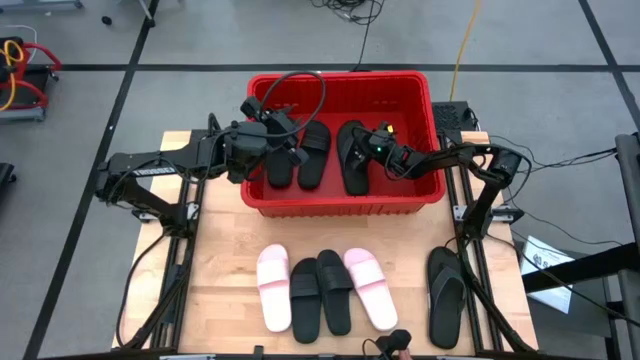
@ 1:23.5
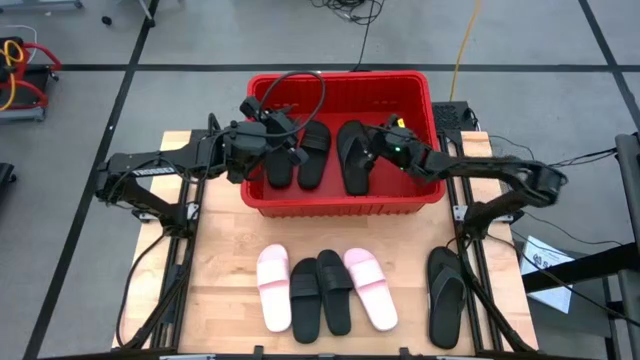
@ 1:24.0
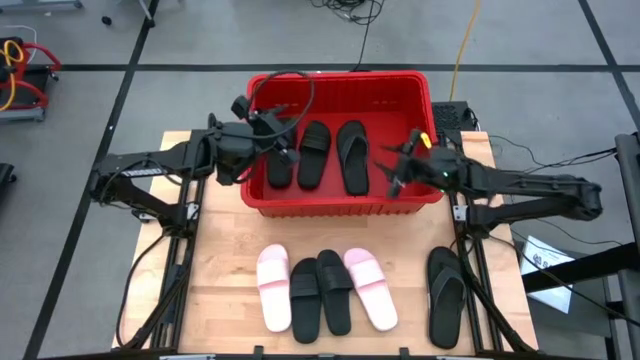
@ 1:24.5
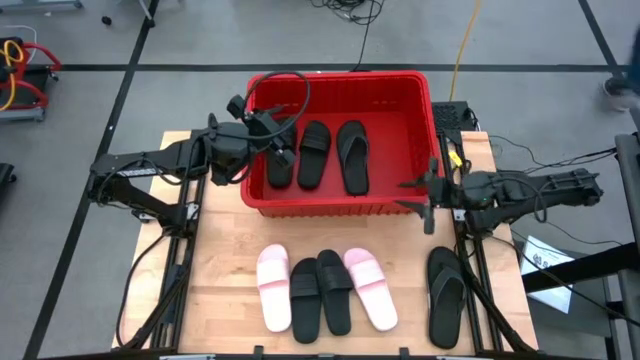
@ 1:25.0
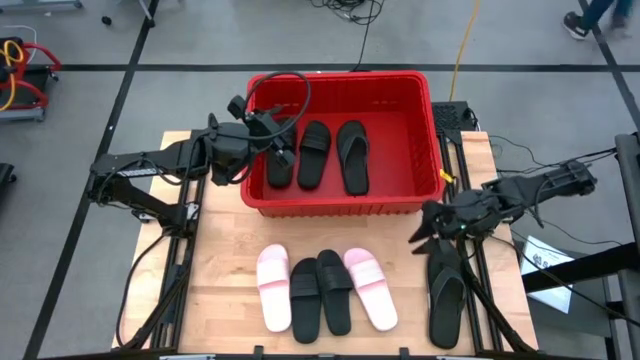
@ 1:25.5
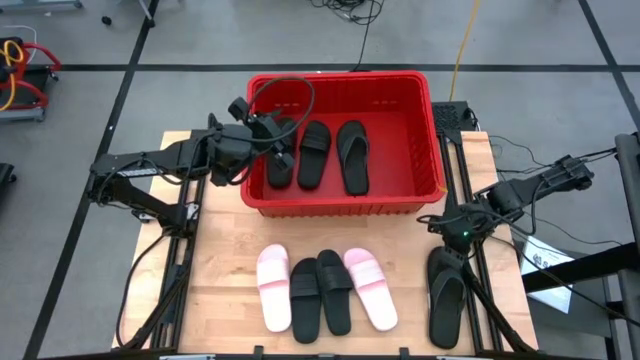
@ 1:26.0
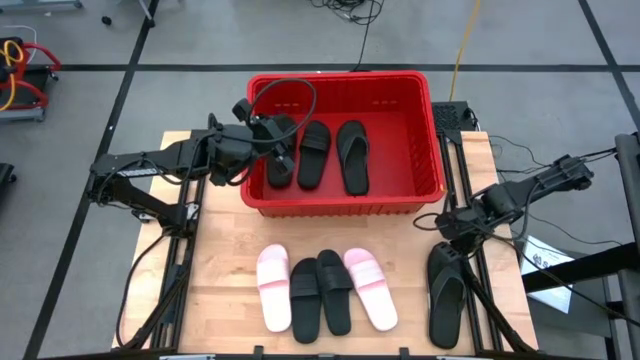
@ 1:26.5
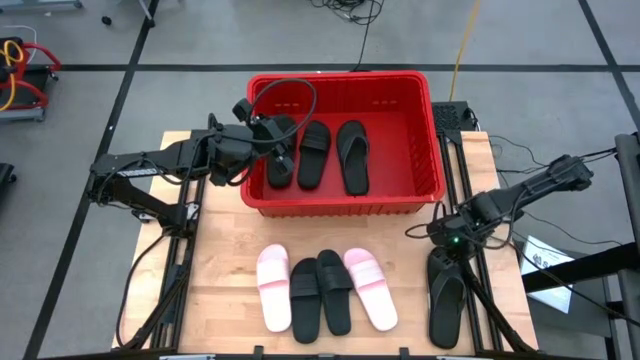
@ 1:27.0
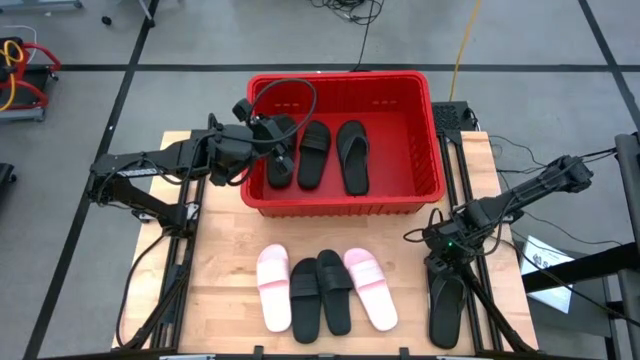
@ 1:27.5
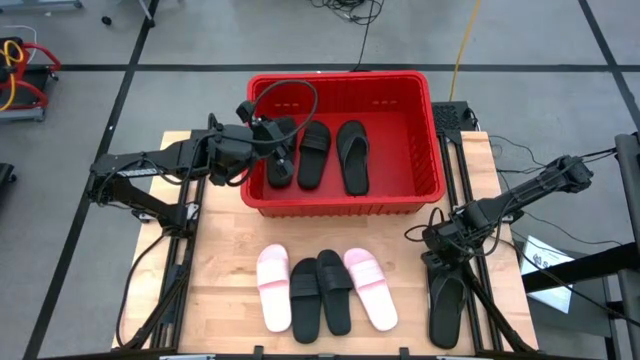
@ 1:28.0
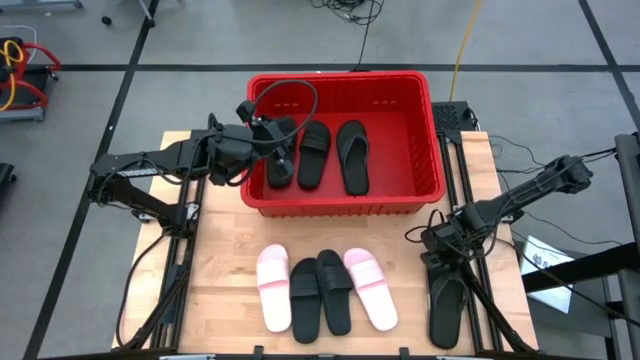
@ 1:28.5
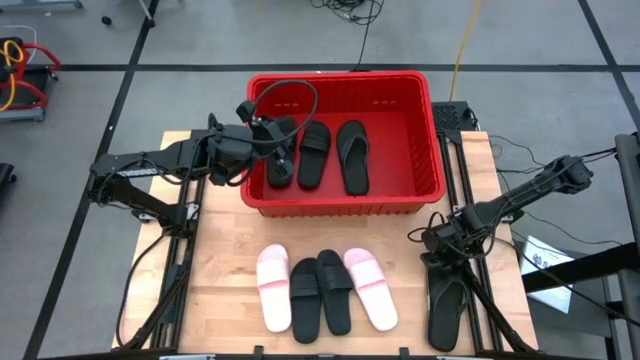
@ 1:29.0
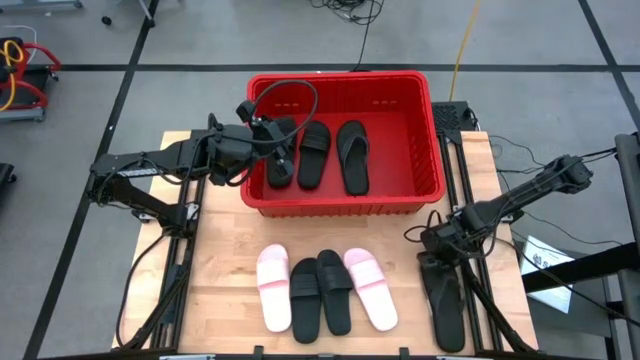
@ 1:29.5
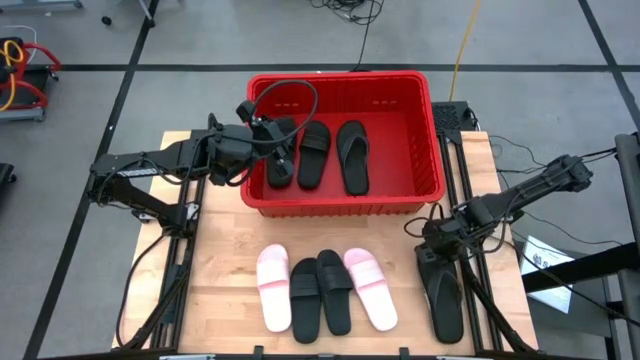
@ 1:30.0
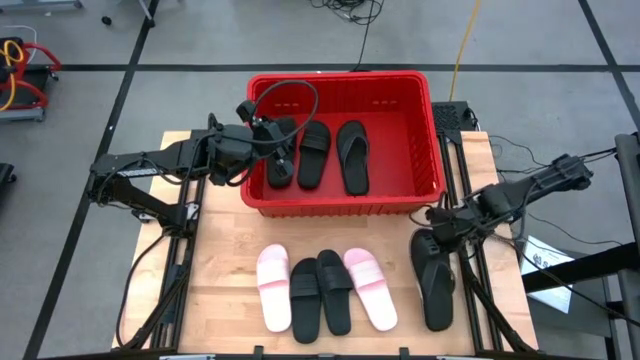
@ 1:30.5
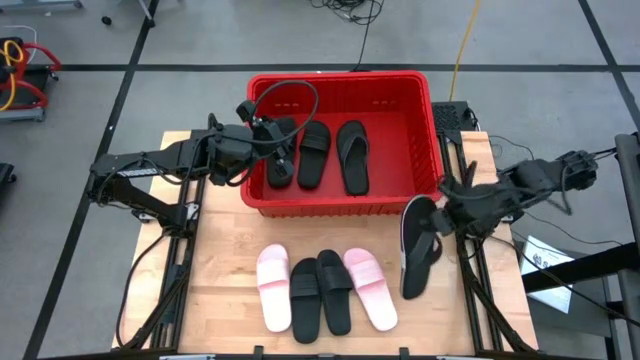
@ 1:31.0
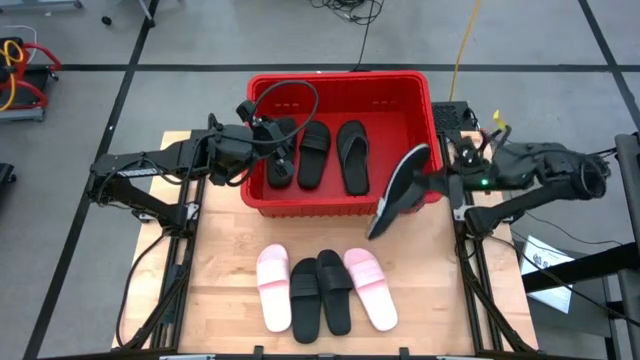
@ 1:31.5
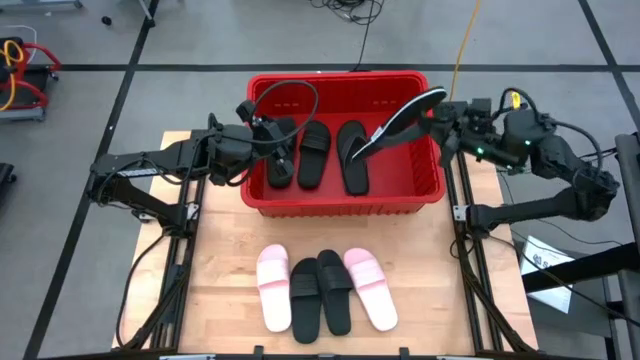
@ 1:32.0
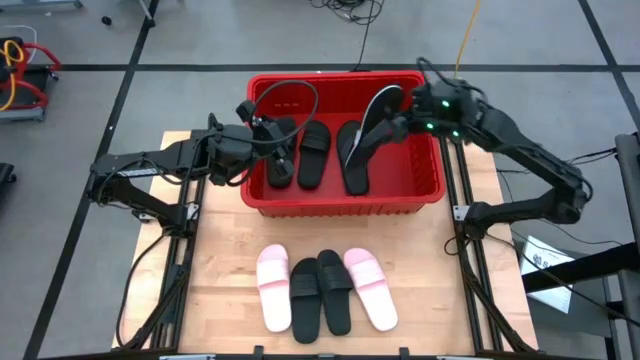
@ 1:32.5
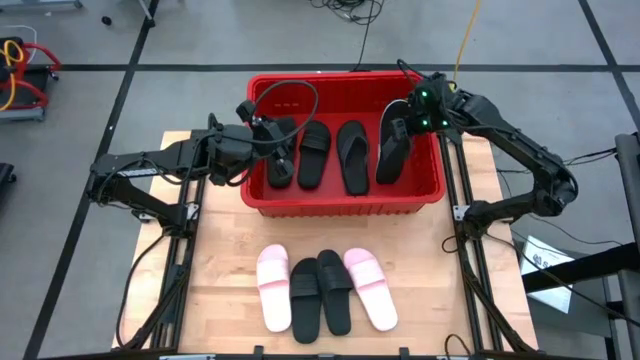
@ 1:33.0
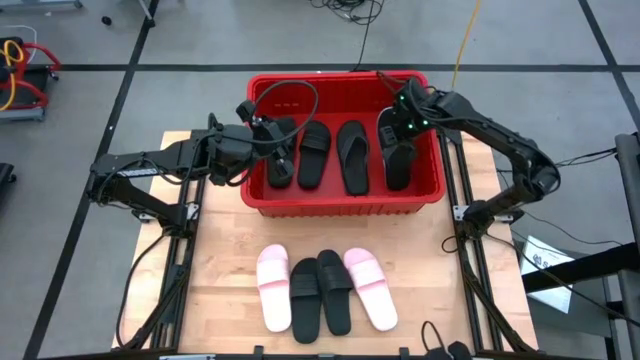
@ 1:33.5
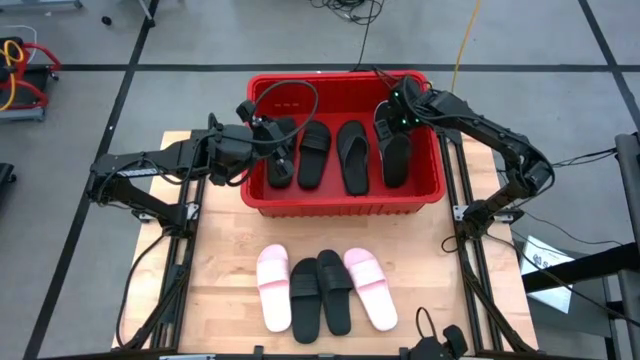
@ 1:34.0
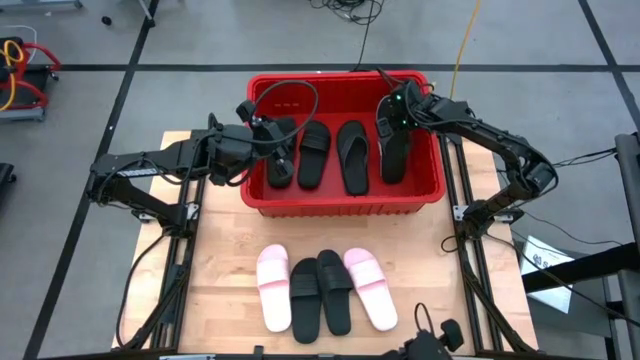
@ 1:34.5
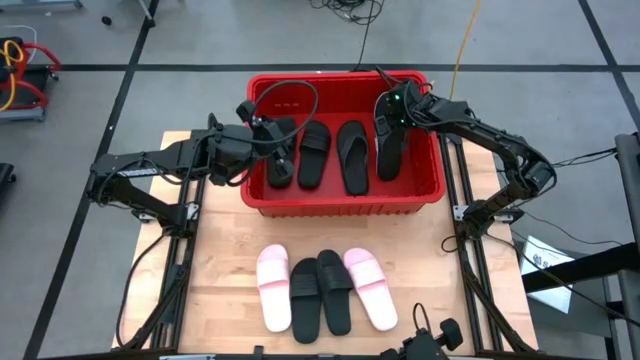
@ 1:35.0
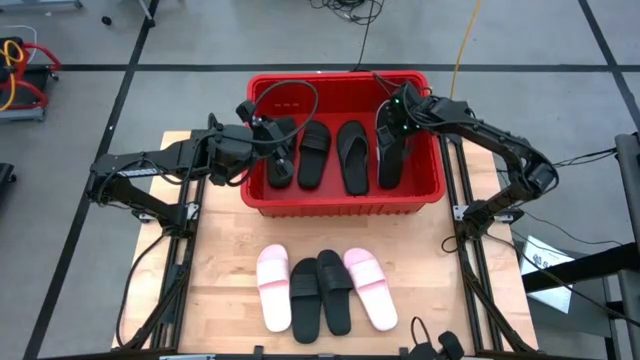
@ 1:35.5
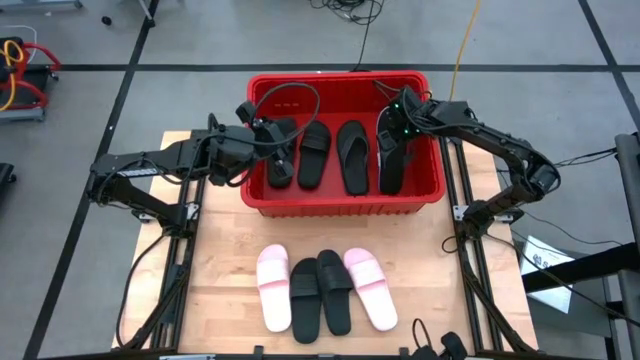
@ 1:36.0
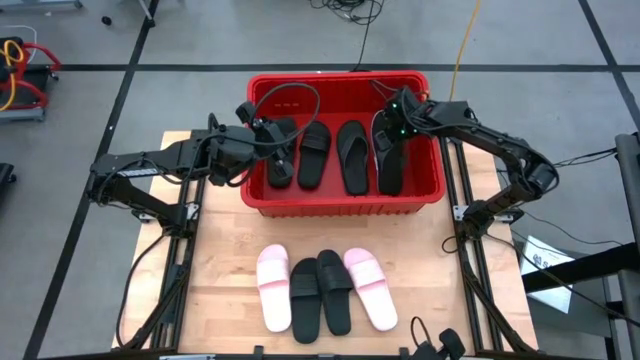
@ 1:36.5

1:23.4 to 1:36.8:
Task: Pick and place slides into bin
Put the black slipper into the red container

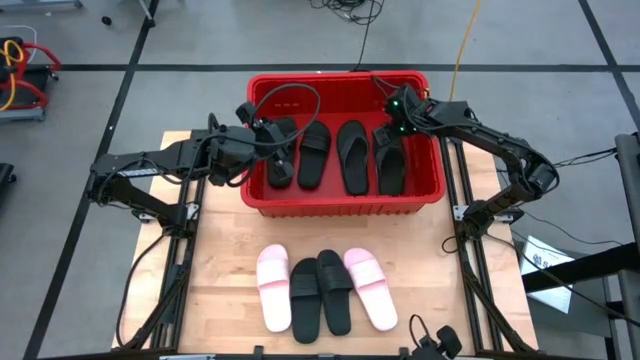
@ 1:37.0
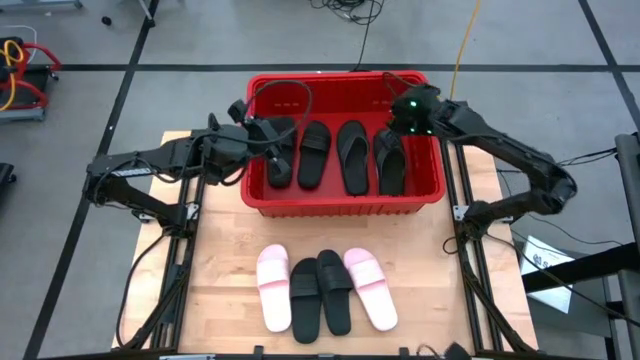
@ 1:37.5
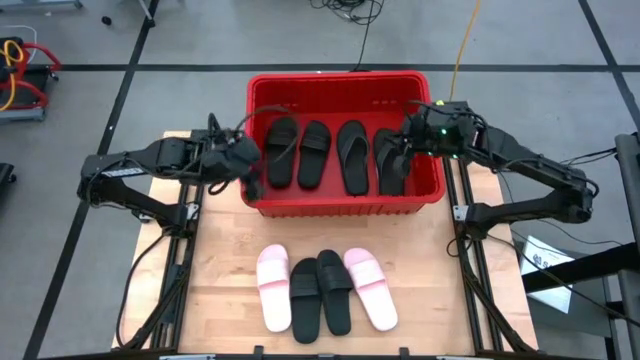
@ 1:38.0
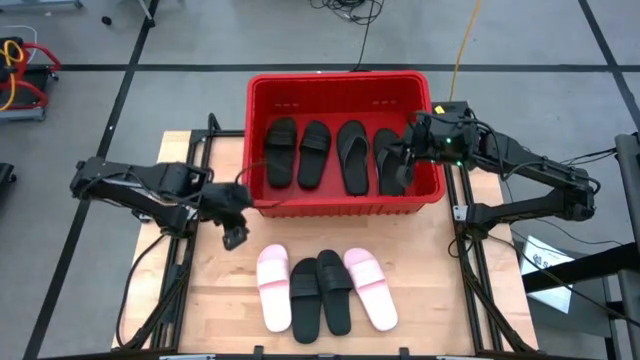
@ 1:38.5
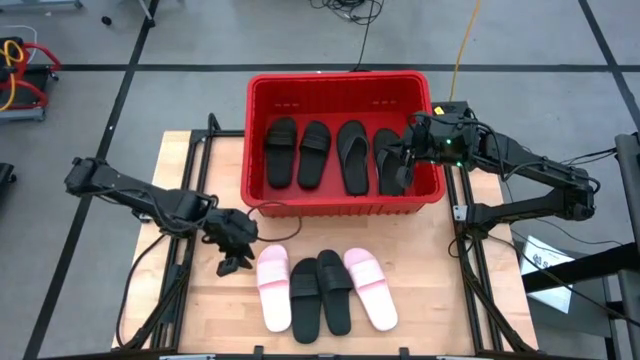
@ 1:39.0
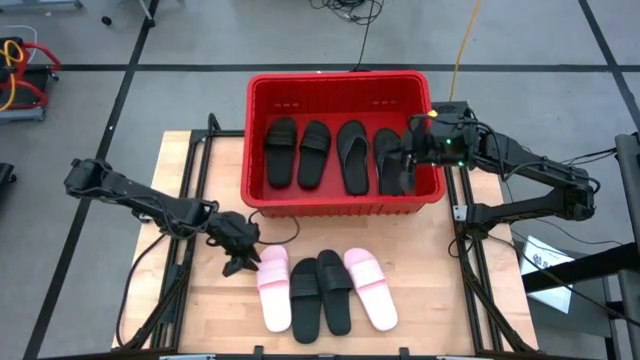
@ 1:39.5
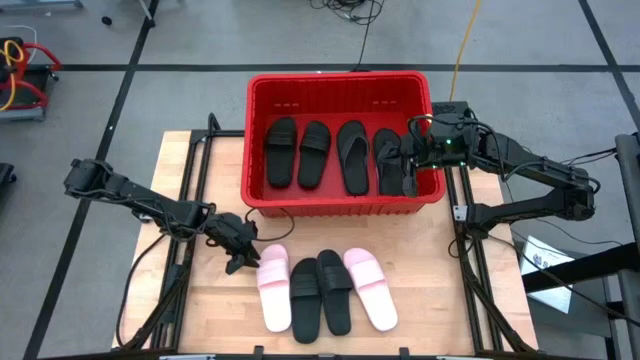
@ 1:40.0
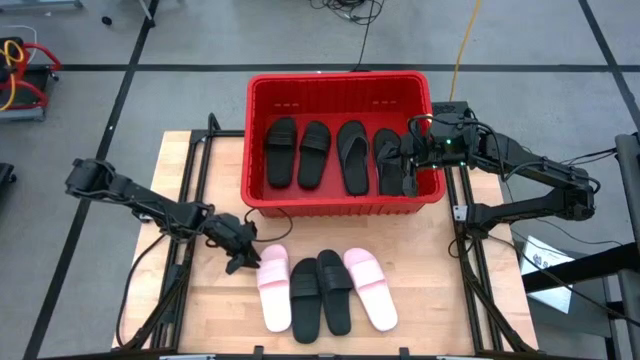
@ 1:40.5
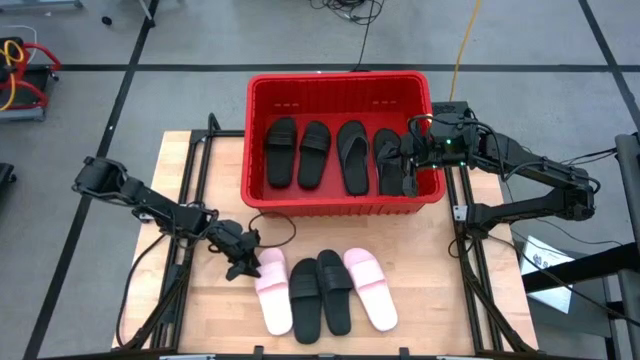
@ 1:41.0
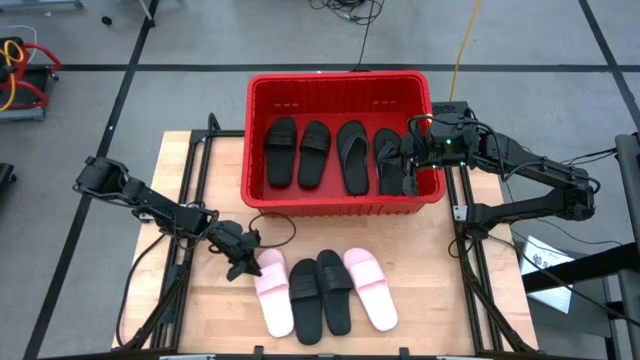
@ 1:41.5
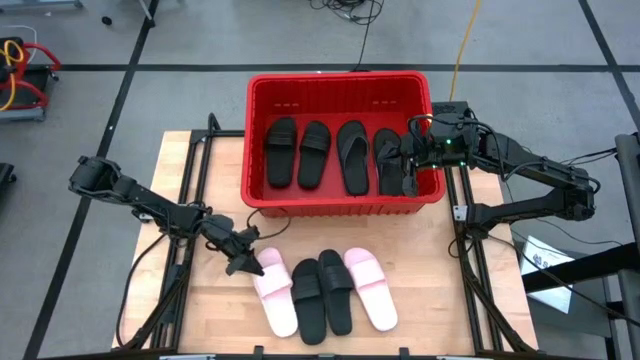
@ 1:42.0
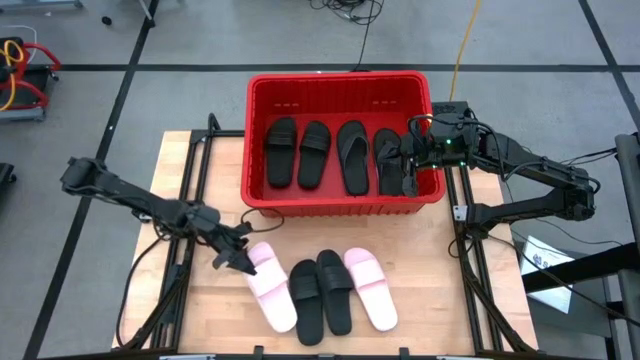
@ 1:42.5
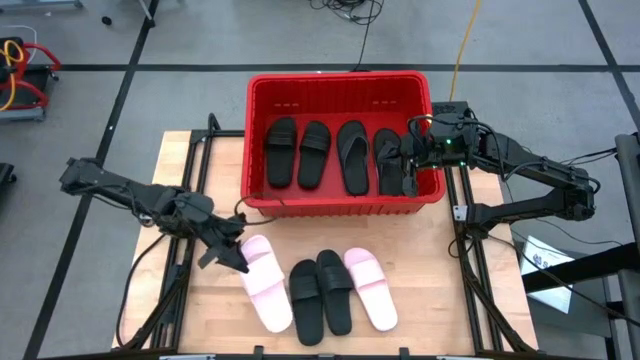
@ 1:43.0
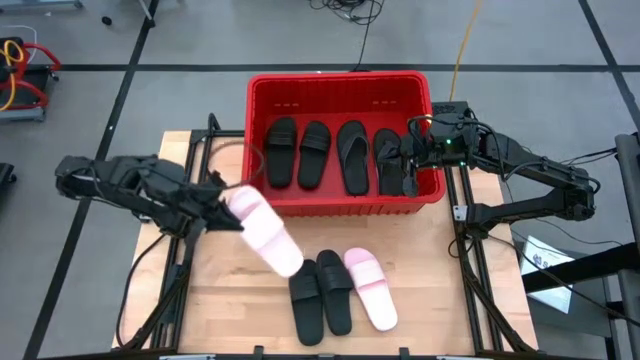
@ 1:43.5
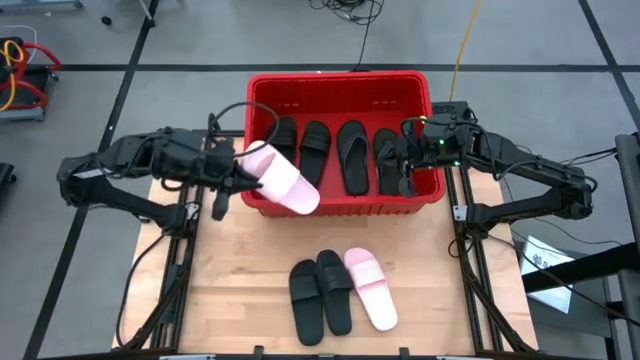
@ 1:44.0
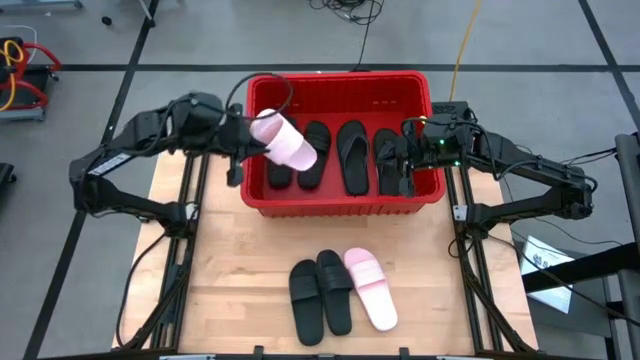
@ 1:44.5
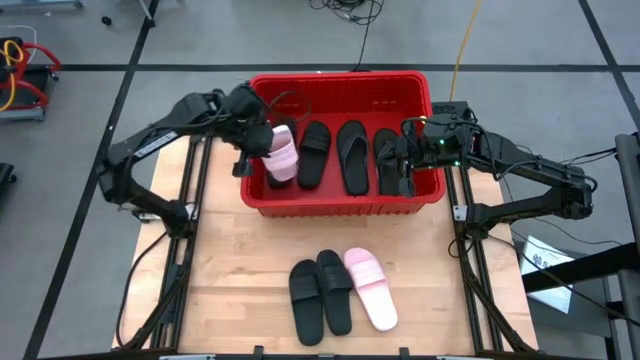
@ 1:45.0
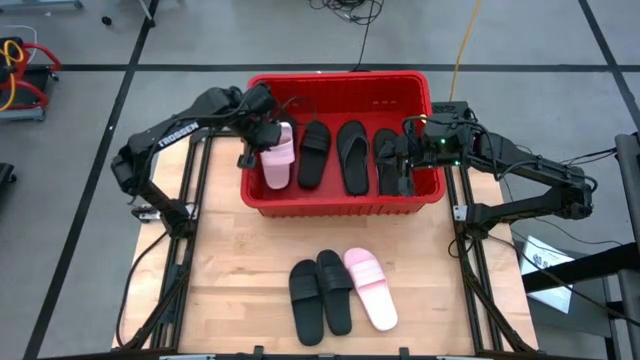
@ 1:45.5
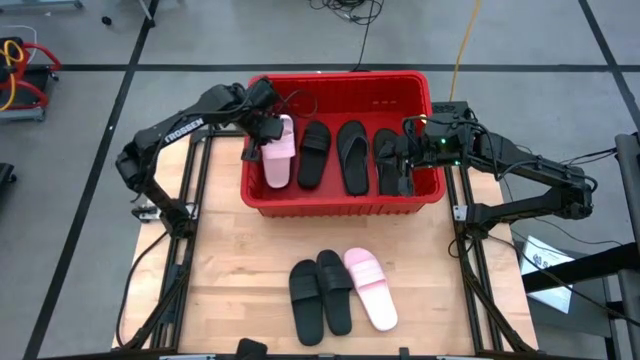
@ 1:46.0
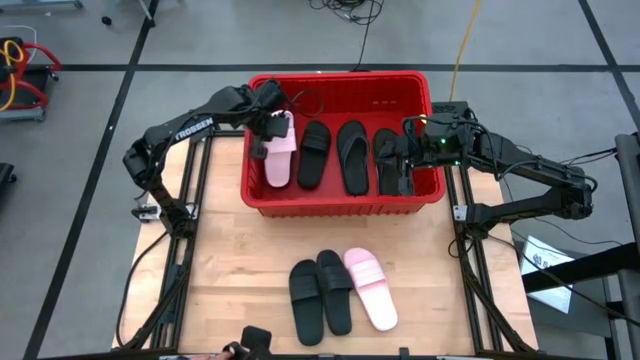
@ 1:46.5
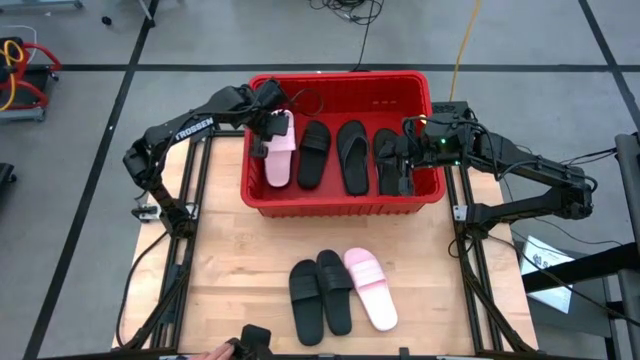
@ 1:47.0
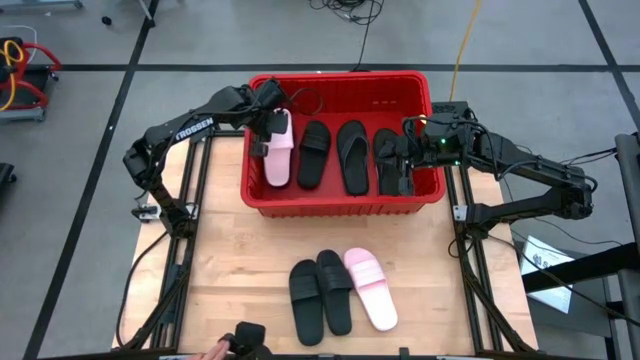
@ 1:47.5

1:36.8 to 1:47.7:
Put the pink slide into the red container
